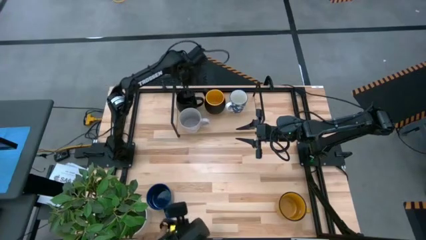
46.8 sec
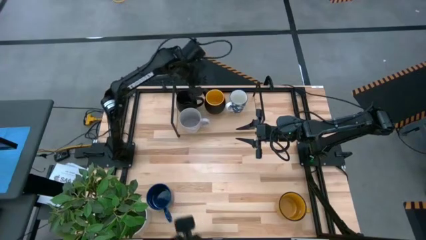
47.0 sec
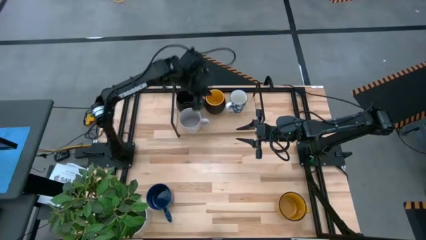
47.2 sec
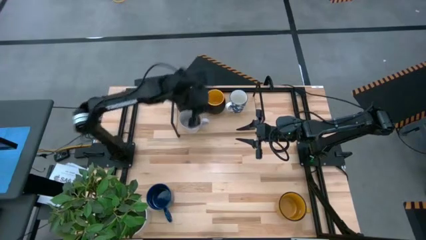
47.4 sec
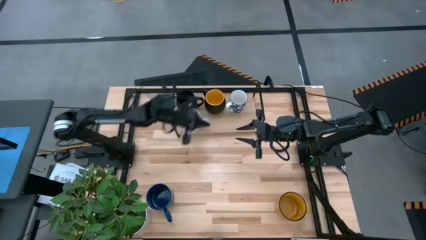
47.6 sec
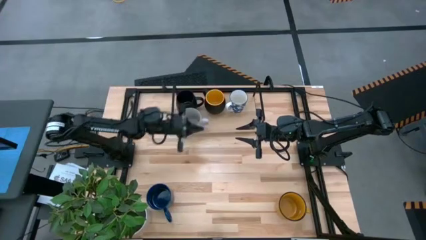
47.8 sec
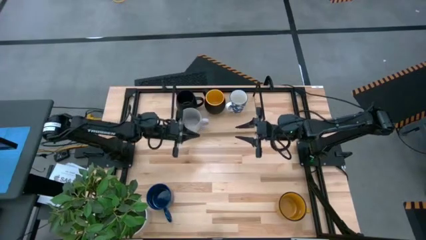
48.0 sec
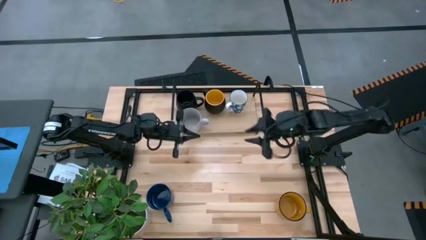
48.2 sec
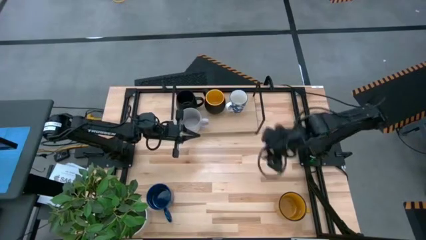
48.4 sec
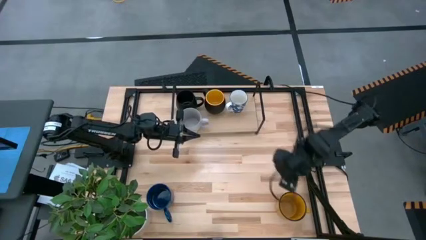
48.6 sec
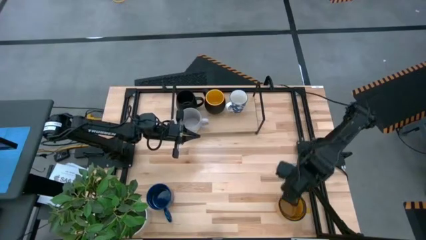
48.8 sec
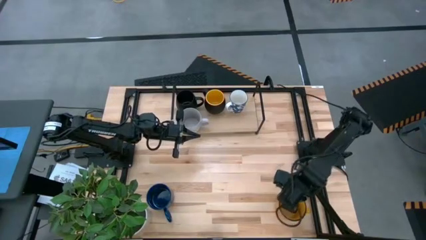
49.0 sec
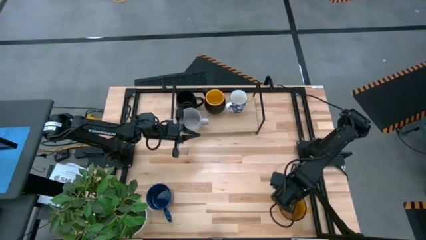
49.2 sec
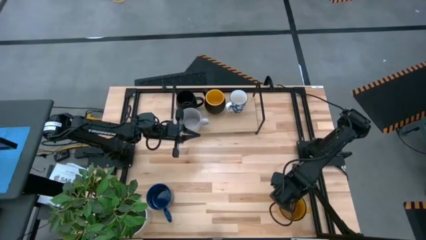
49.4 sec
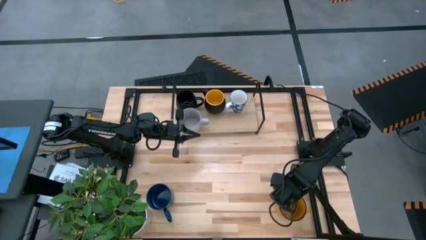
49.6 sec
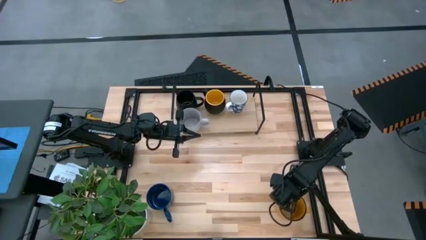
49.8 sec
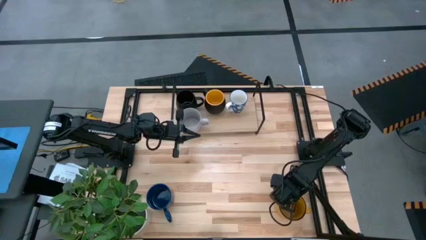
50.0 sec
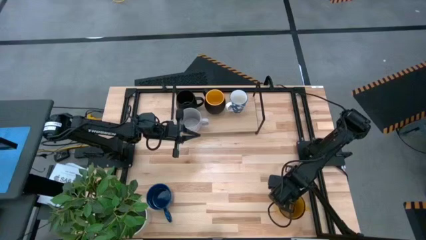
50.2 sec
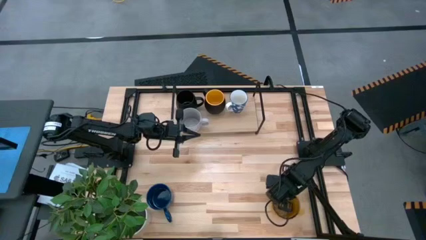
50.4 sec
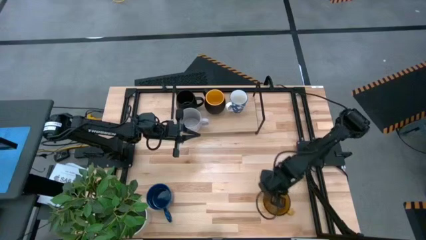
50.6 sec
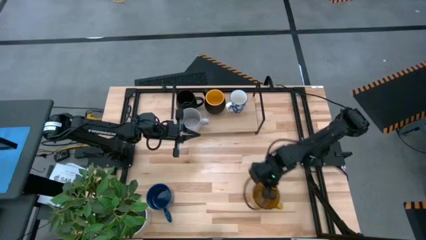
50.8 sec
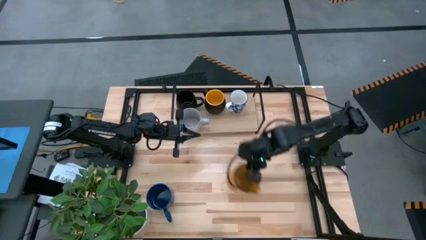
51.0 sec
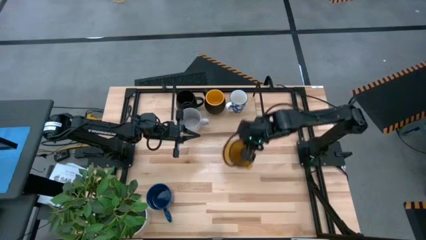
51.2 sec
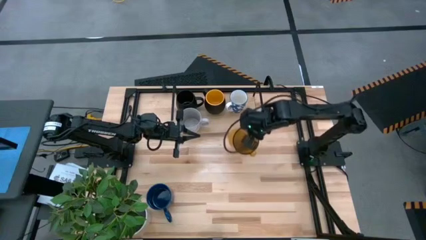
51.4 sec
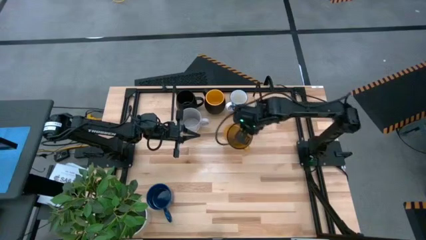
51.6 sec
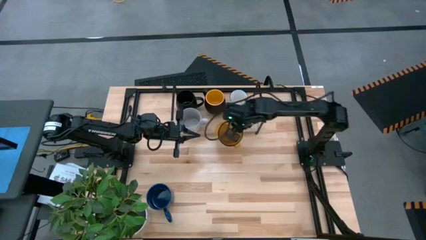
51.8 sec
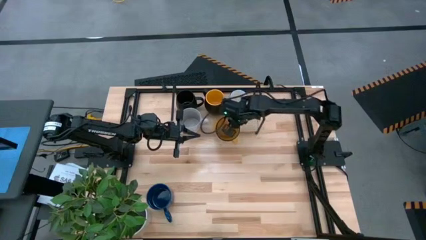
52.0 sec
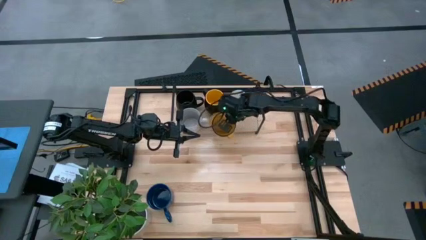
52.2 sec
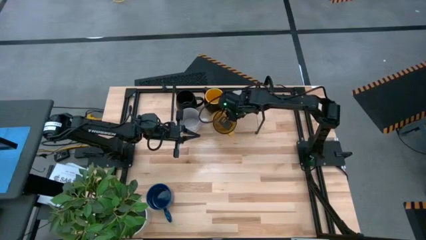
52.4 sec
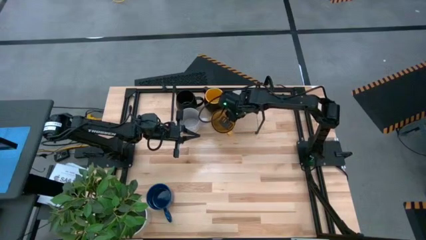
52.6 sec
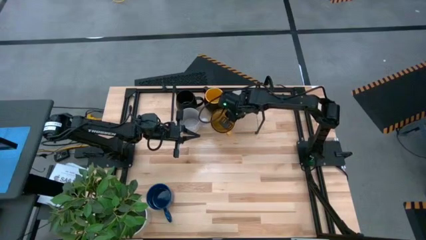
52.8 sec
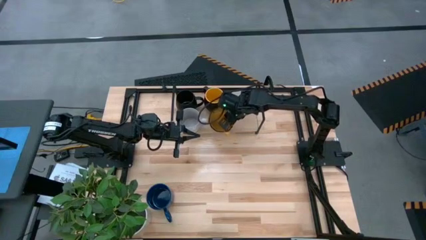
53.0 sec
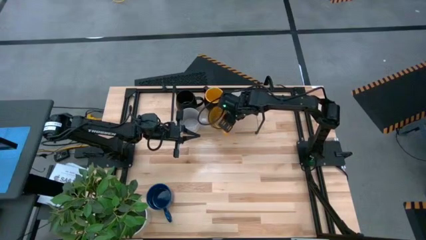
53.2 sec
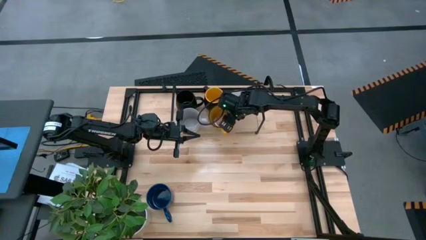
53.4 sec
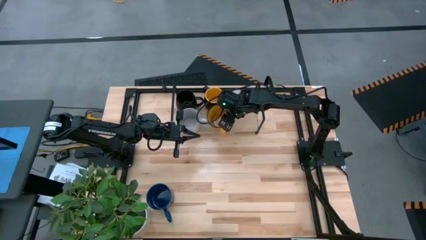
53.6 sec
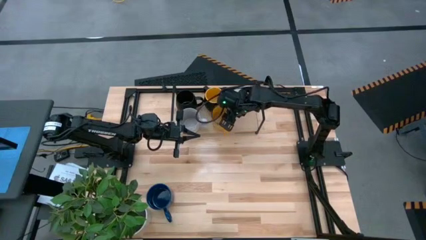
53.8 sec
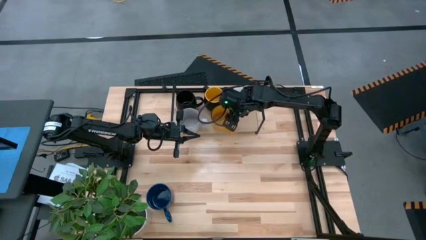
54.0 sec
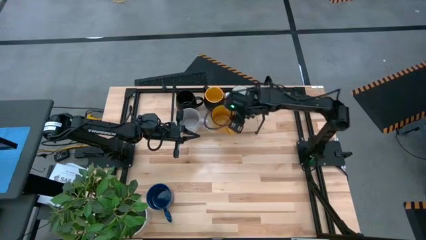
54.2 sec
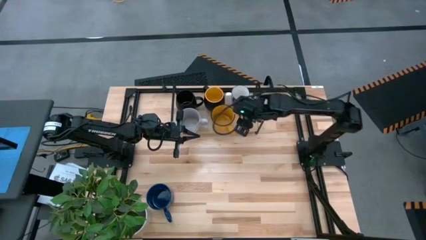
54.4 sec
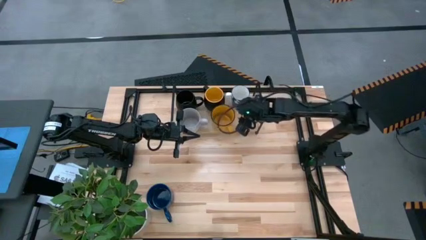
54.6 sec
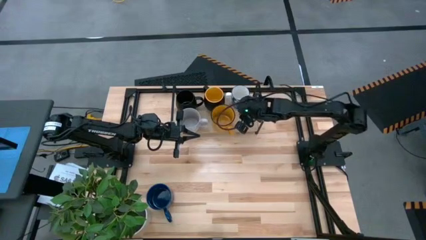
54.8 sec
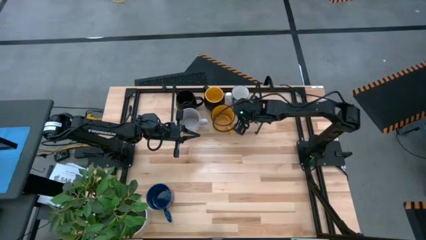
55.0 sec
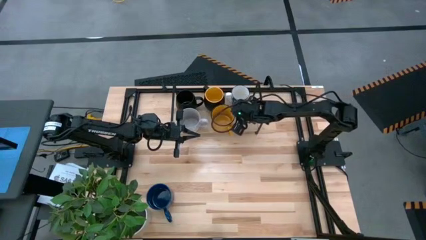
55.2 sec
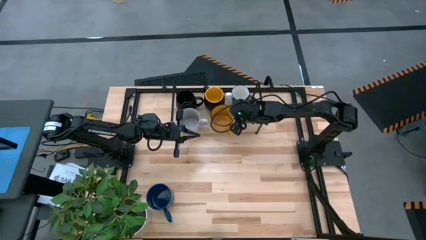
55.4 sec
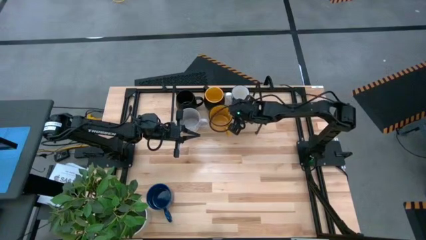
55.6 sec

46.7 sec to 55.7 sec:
Task: Place coffee mugs
Put the yellow mug on the shelf

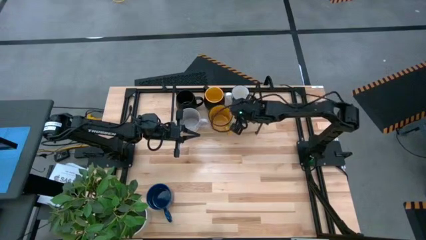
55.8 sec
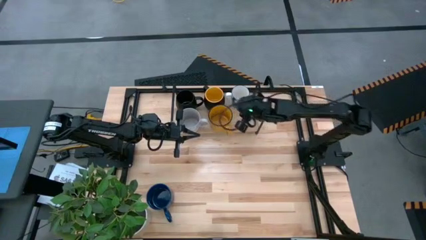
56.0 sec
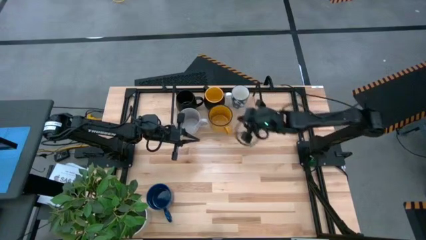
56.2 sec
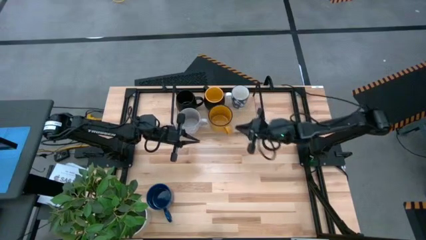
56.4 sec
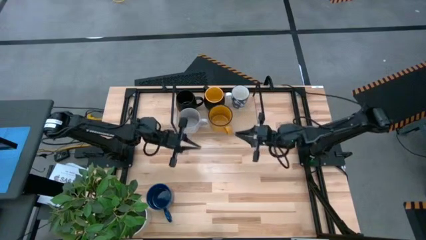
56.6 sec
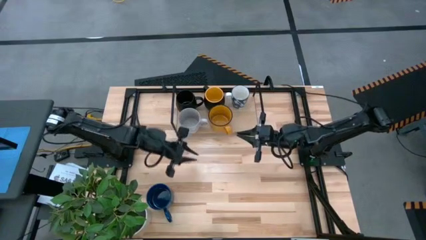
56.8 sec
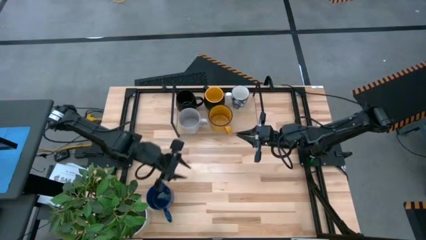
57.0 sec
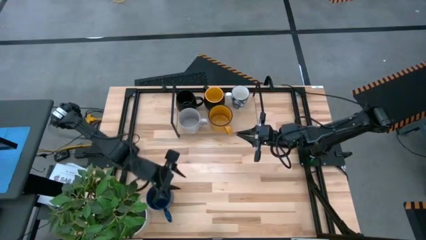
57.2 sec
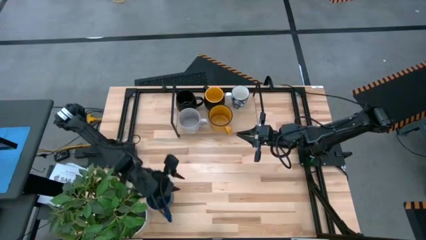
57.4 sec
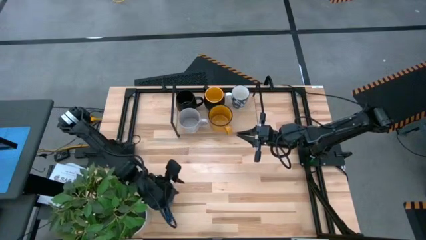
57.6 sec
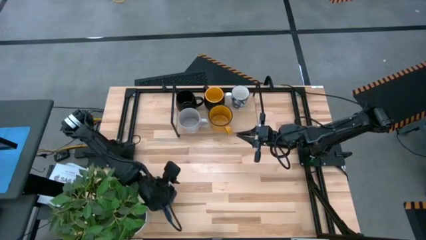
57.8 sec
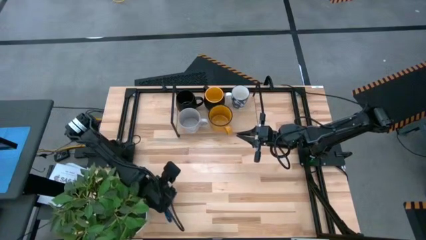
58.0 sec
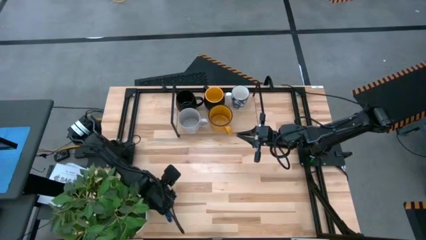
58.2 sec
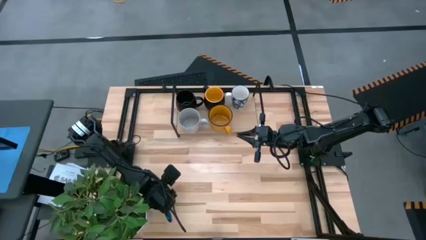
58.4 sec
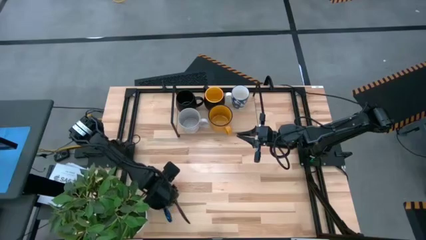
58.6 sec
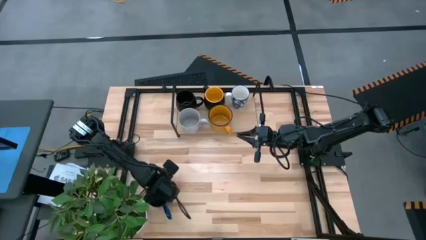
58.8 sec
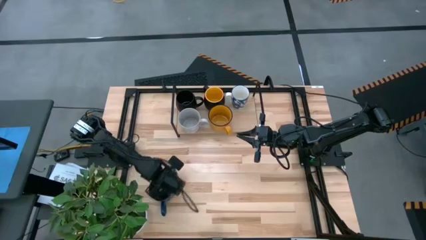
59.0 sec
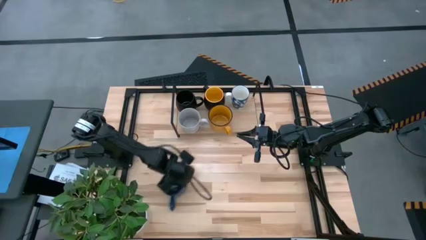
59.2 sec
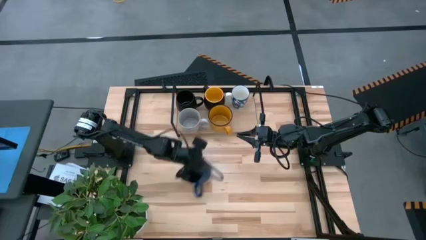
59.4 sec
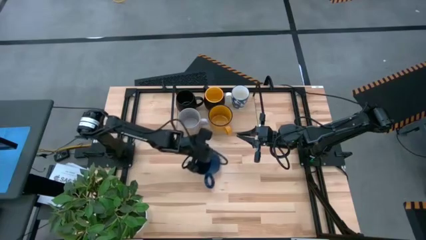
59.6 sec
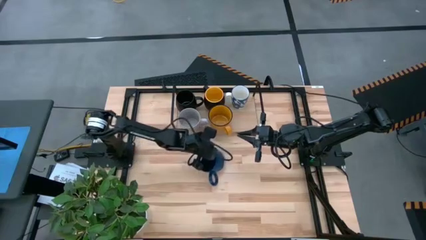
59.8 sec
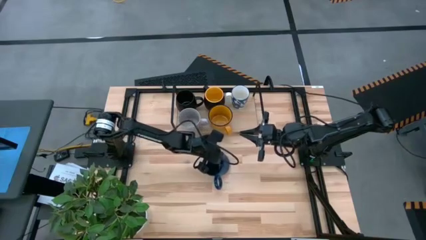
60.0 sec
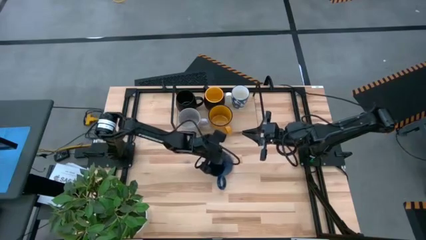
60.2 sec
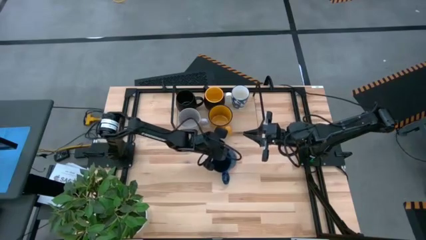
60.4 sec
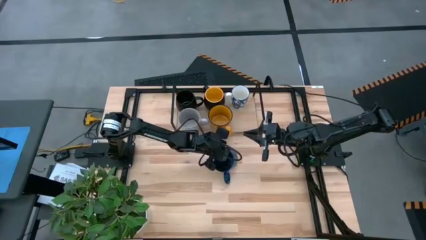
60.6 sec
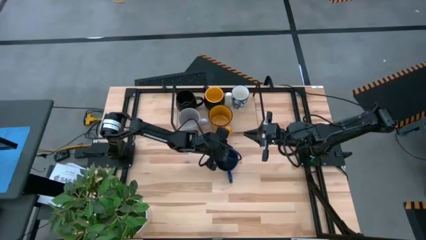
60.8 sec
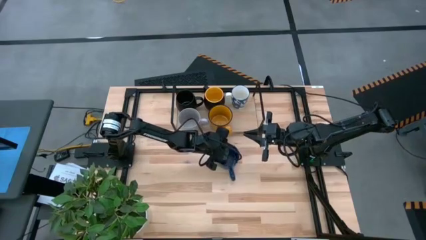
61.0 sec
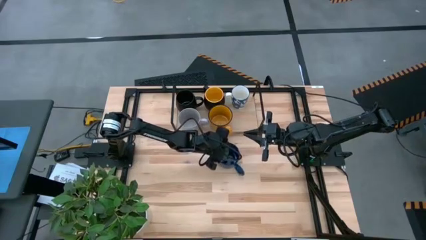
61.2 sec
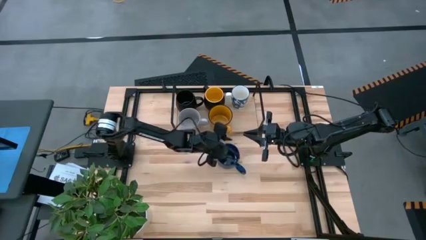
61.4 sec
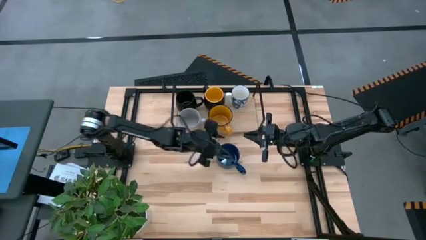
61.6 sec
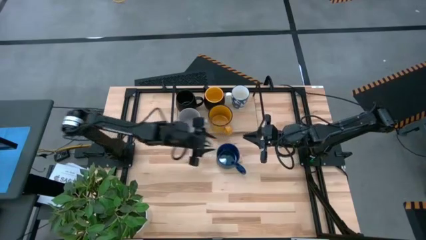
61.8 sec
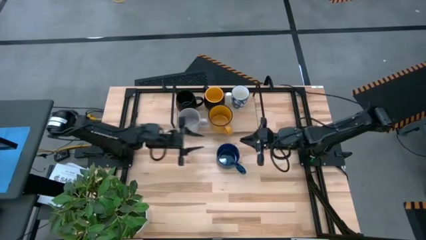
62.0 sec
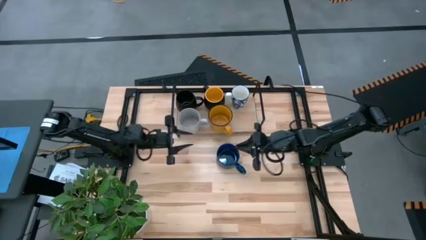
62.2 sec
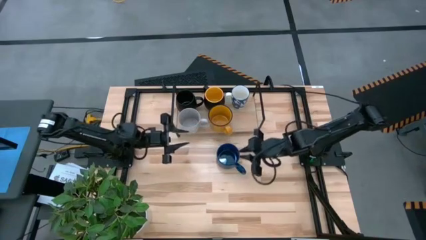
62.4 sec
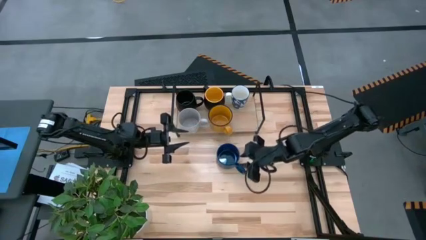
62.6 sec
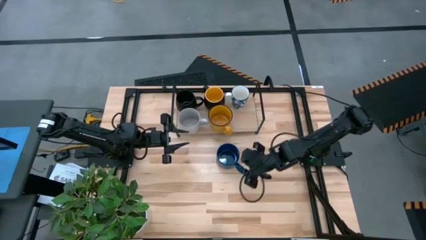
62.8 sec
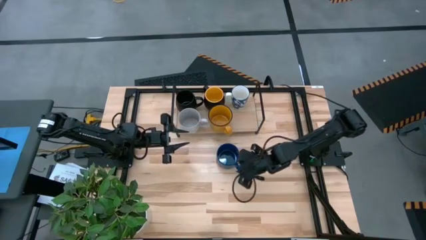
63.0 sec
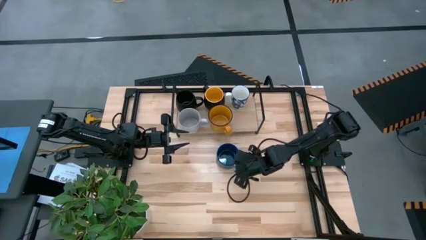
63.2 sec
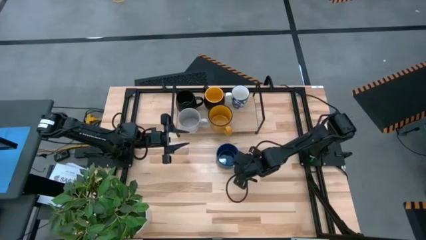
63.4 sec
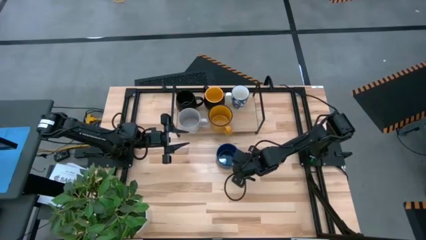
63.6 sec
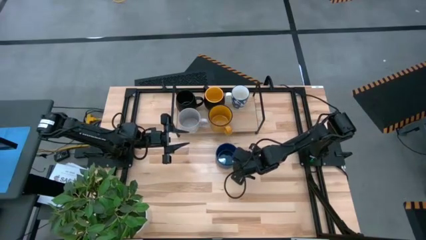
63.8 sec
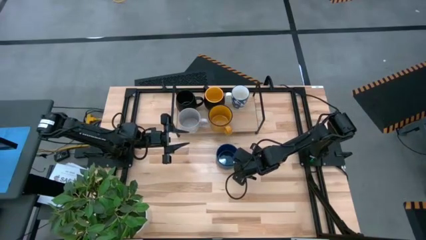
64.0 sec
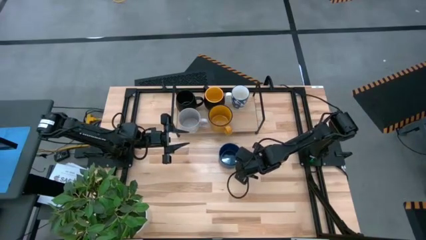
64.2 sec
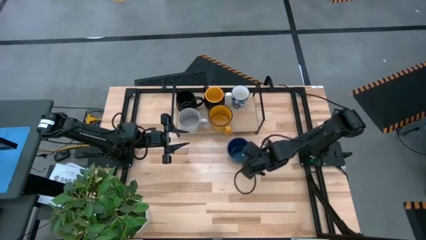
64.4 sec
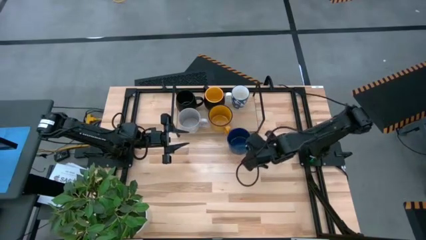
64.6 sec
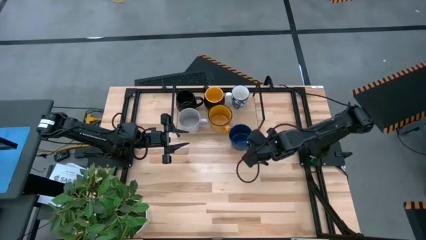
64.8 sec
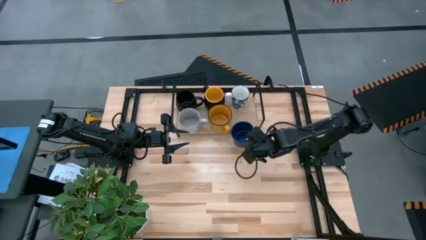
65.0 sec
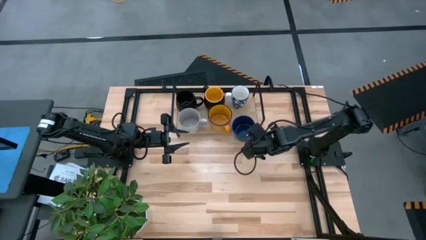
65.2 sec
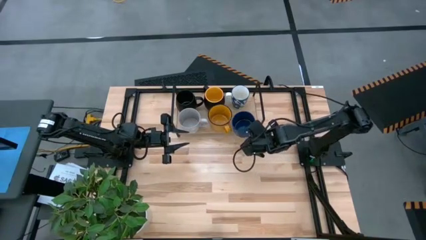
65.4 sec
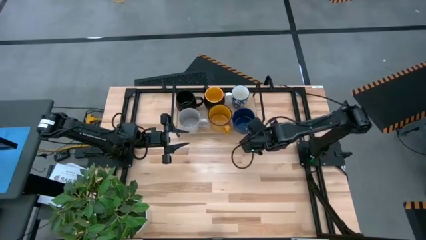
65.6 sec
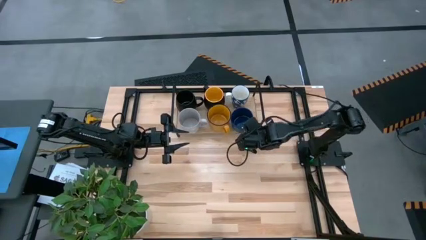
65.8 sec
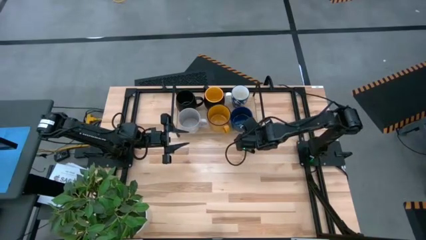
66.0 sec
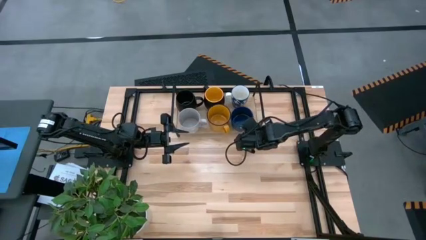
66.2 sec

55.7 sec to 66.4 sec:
Put the blue mug on the shelf
